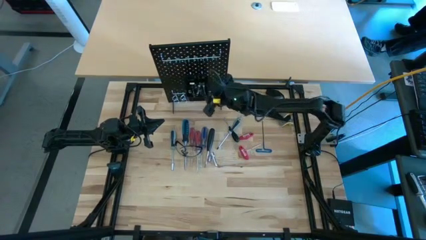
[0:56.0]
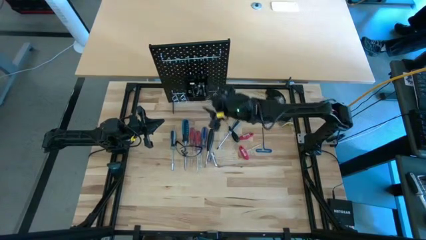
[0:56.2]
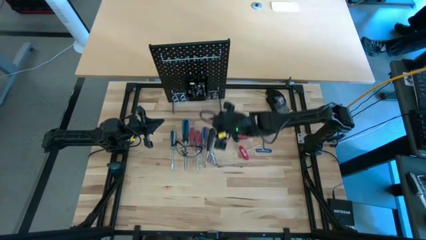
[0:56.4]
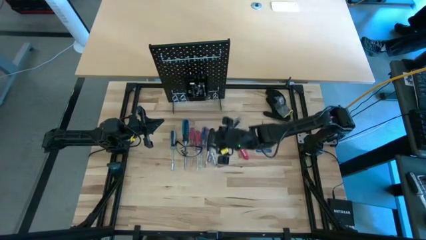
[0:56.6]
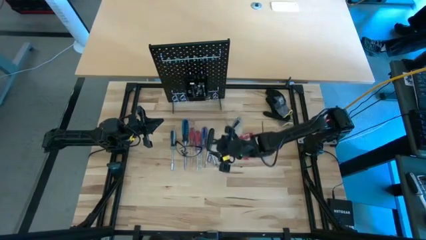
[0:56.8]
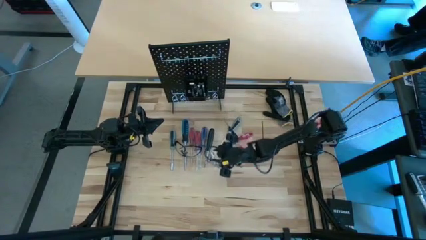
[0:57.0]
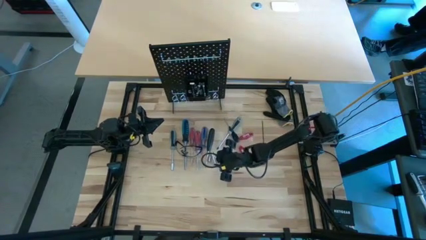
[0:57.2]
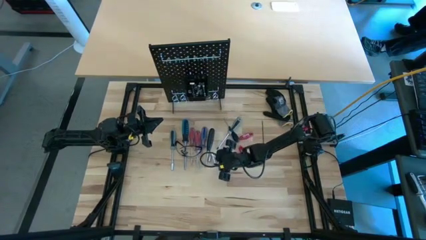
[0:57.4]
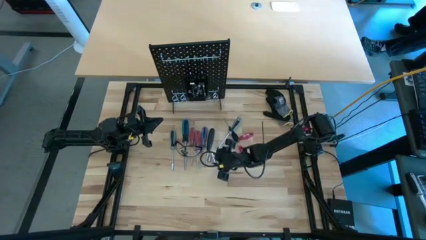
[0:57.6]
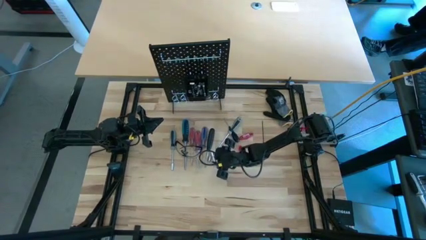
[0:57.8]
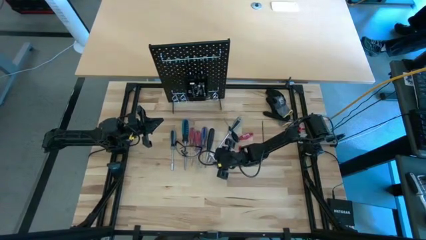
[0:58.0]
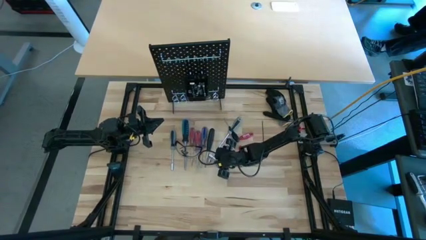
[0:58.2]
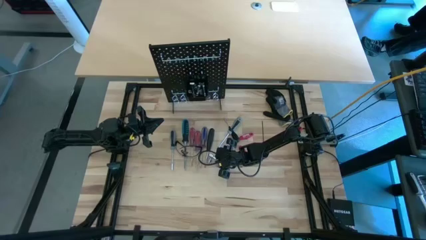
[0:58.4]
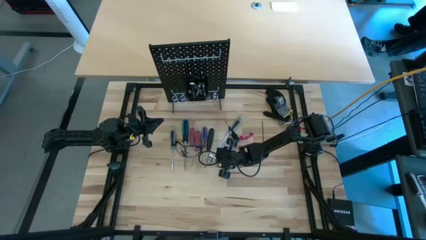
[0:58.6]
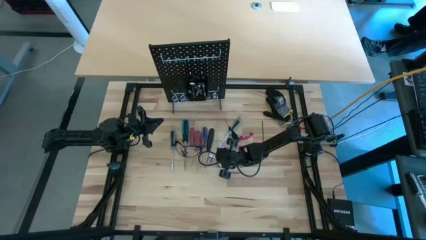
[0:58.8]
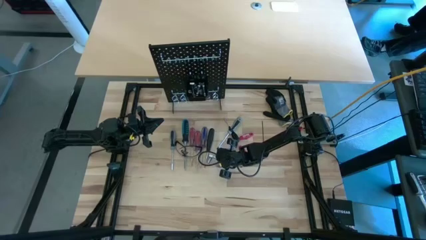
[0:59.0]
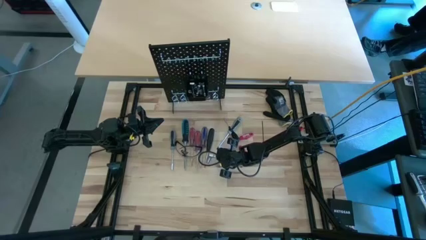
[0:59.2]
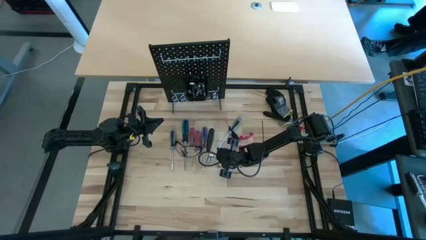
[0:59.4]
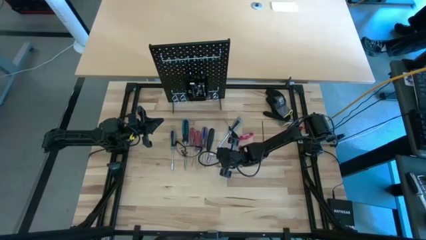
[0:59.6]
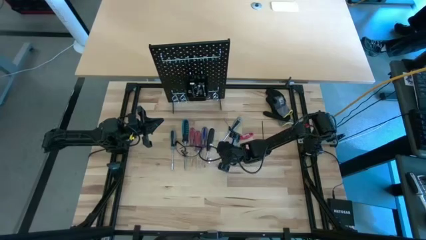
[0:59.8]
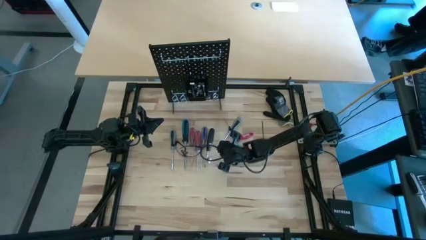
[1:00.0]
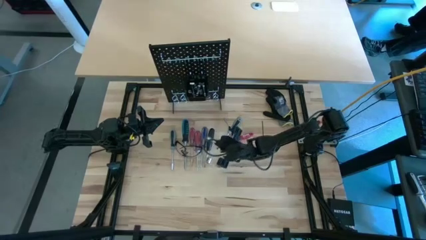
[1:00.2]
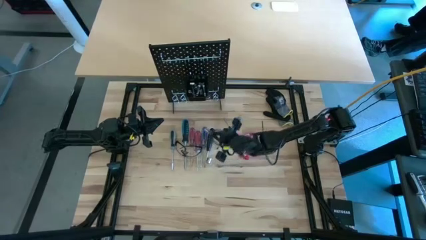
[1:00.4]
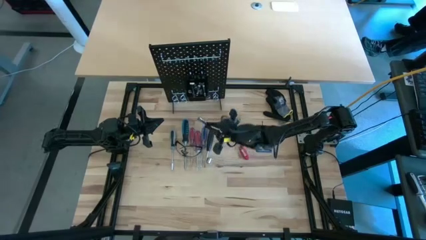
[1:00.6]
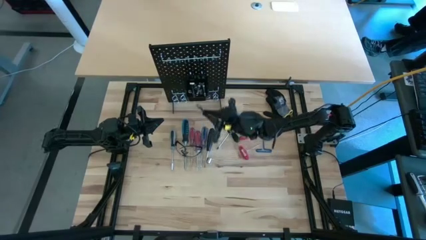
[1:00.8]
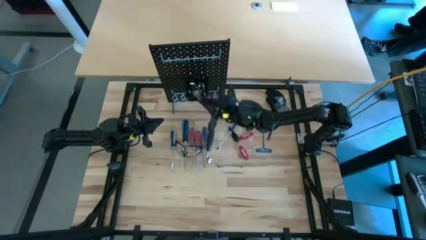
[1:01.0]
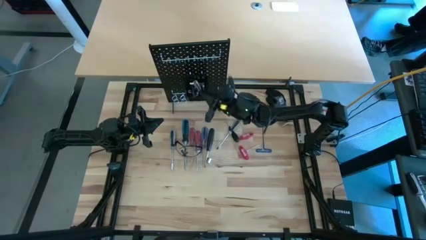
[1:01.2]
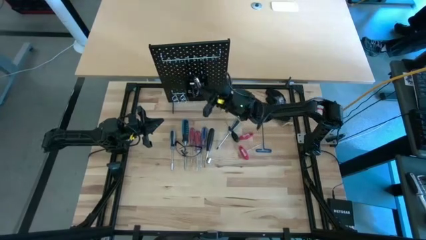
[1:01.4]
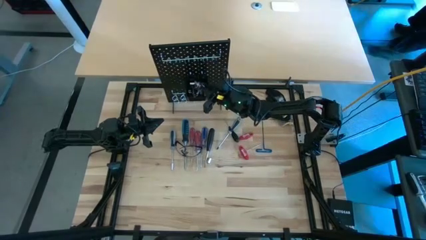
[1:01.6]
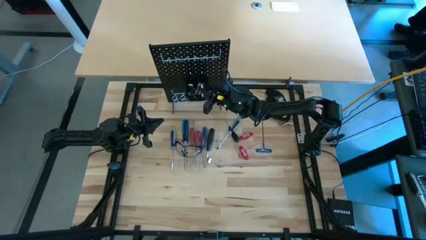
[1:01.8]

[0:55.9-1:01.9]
Task: Hang tools onto peg board
Put the metal extension bar into the black bin on the peg board

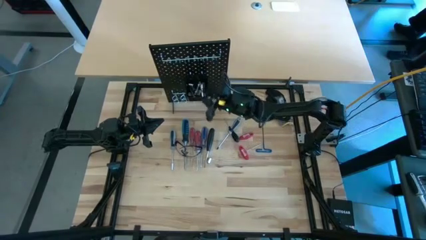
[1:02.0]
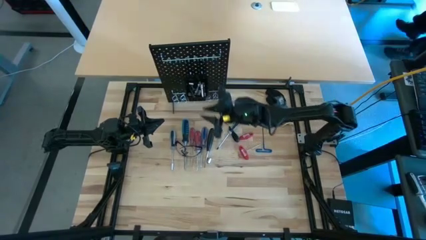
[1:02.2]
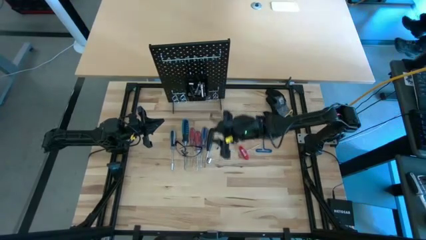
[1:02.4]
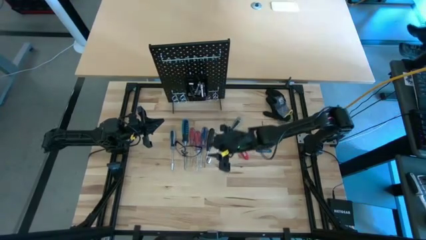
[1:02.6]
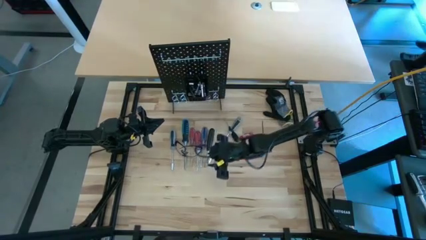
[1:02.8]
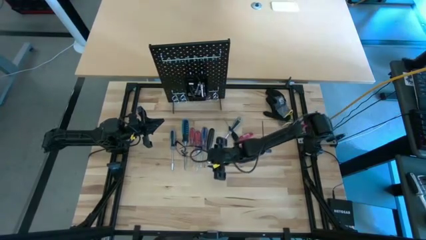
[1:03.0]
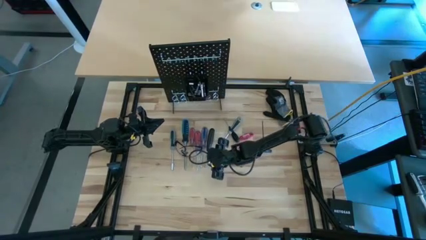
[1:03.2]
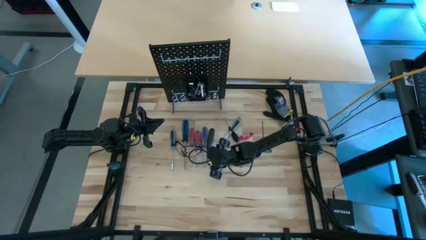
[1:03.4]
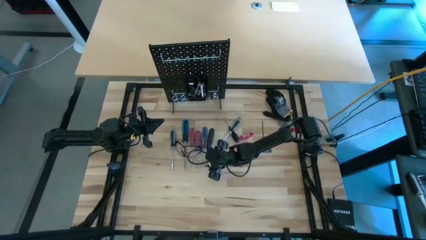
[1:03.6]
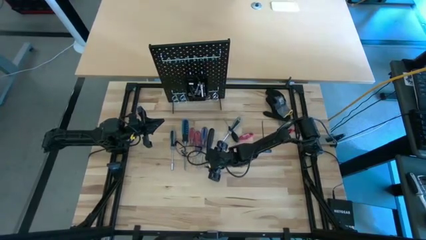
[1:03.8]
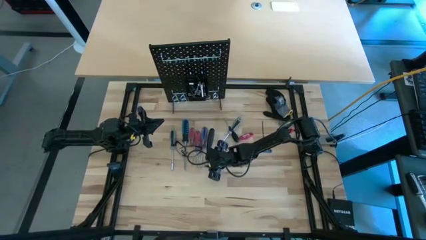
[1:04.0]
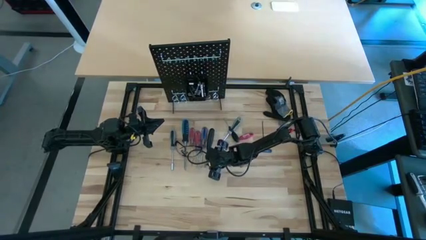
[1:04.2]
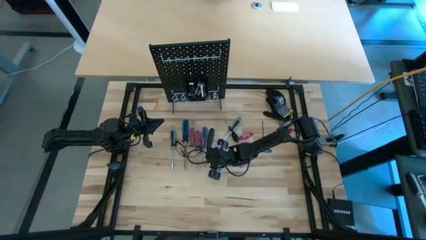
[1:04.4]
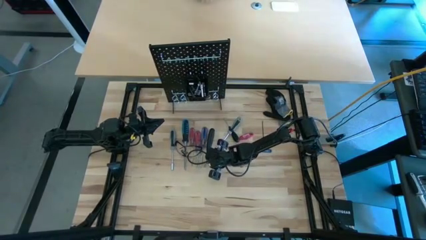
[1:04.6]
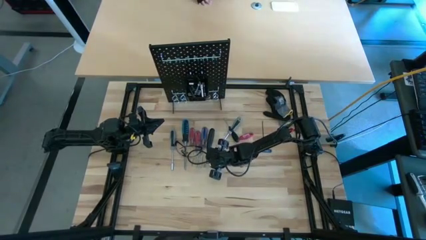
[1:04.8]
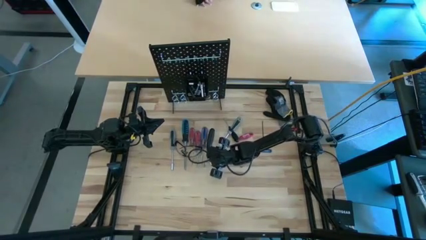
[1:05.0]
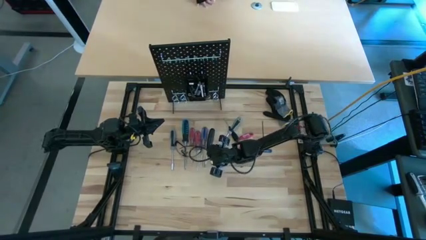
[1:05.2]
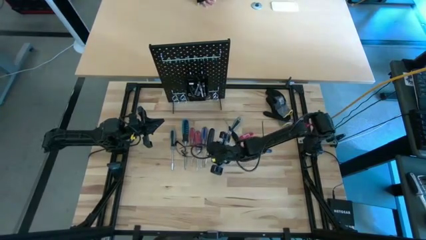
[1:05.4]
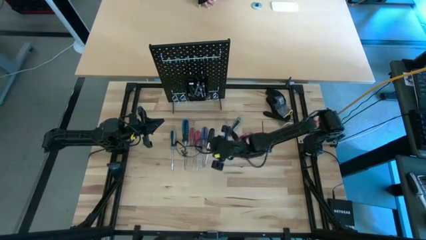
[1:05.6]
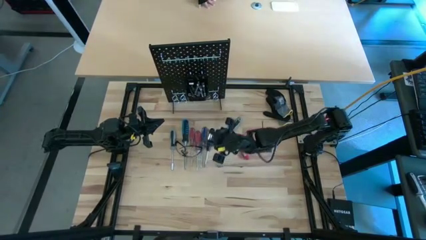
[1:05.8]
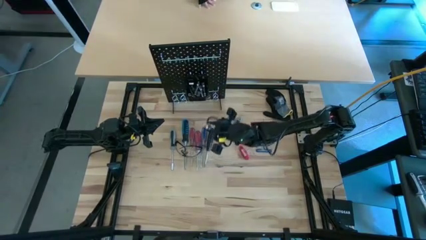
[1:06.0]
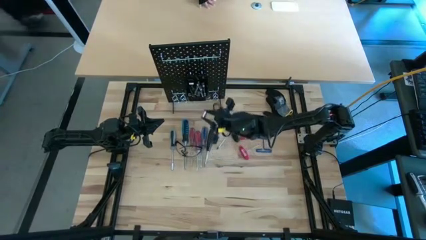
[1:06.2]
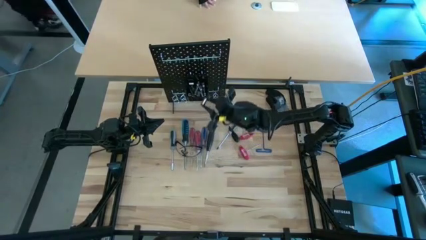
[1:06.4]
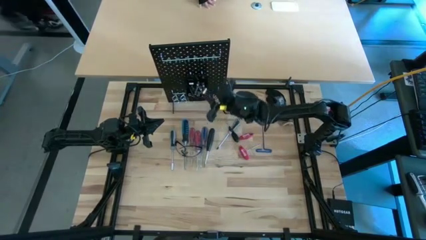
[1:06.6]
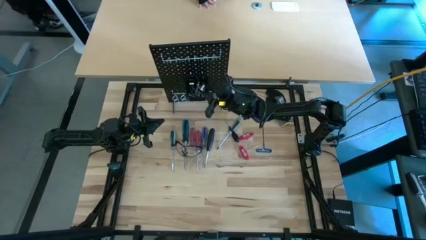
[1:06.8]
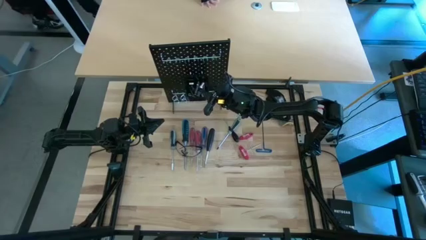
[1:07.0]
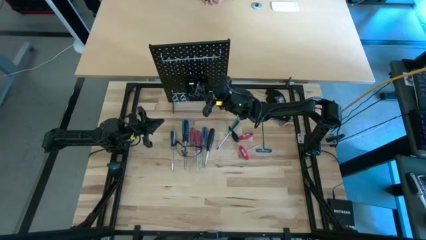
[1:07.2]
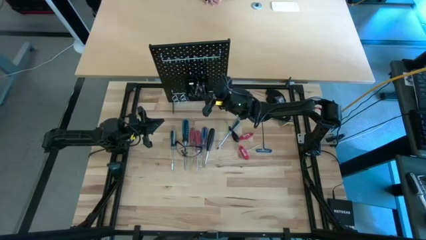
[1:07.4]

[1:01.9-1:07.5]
Put the metal socket into the black bin on the peg board

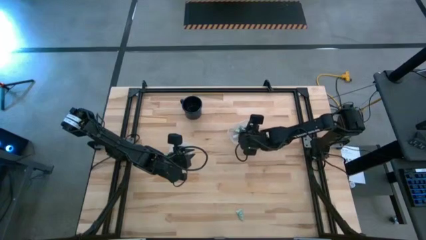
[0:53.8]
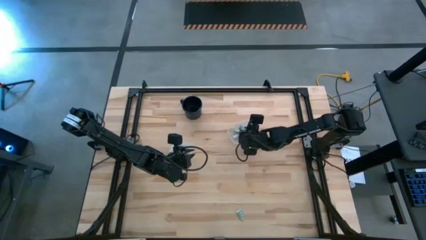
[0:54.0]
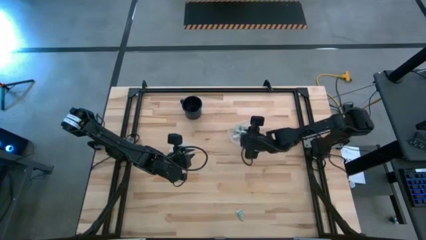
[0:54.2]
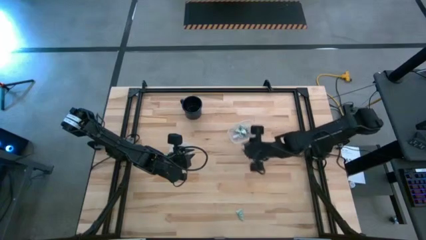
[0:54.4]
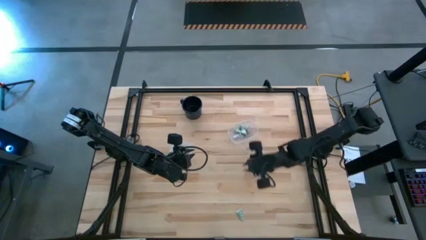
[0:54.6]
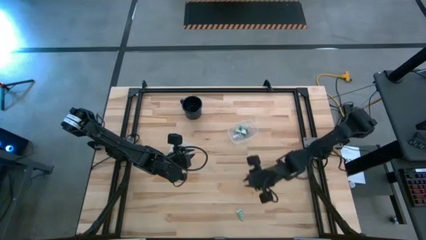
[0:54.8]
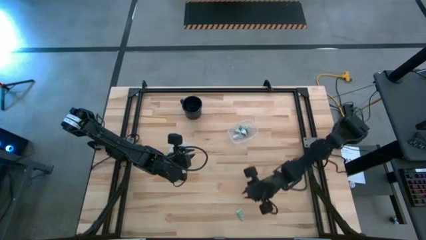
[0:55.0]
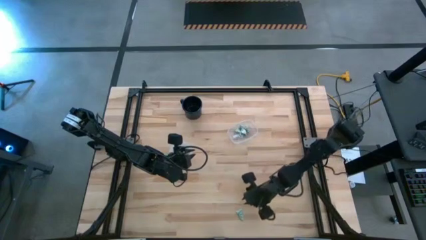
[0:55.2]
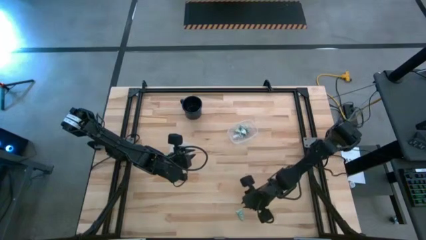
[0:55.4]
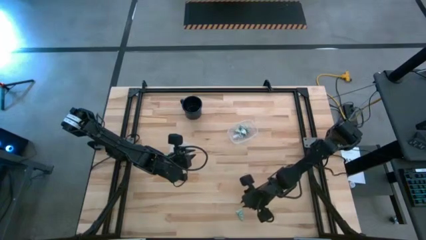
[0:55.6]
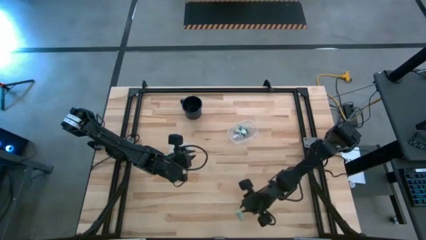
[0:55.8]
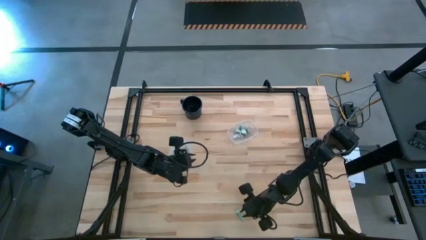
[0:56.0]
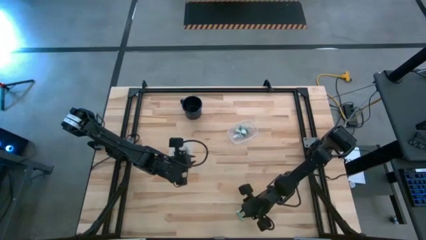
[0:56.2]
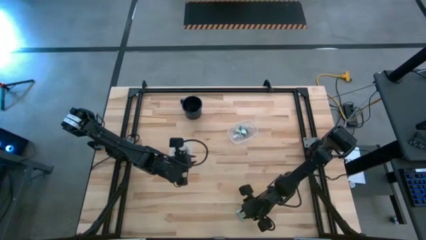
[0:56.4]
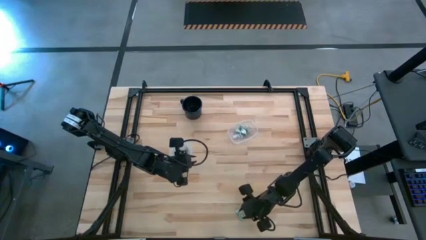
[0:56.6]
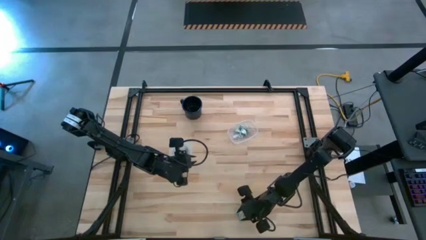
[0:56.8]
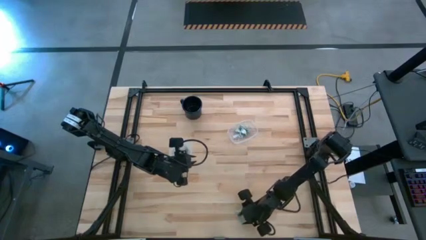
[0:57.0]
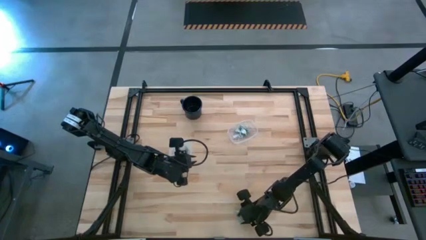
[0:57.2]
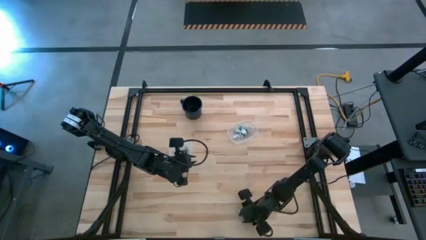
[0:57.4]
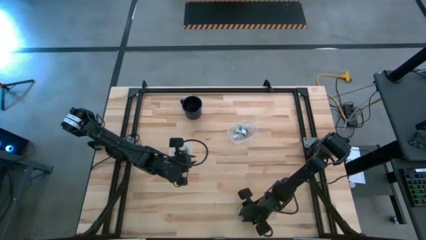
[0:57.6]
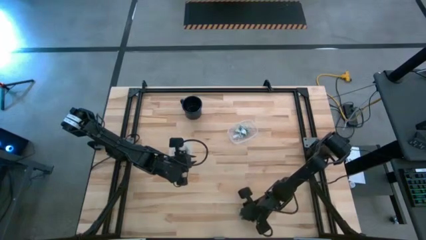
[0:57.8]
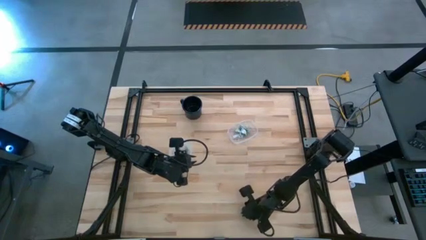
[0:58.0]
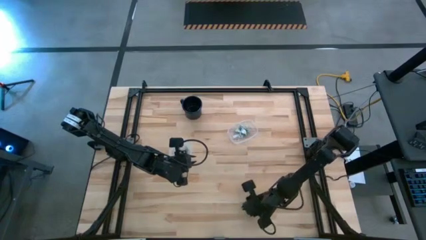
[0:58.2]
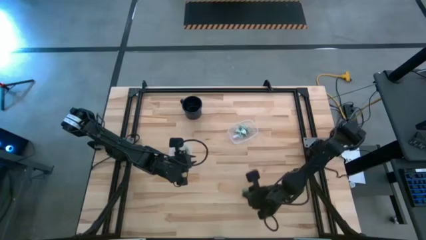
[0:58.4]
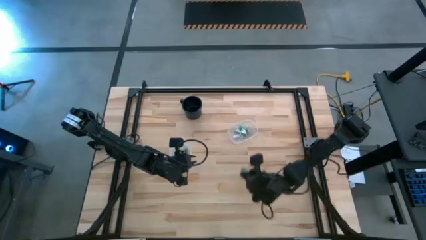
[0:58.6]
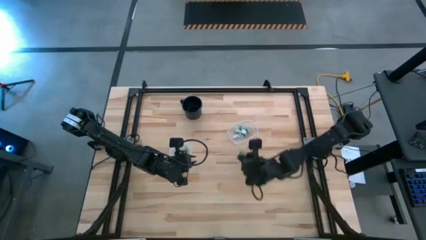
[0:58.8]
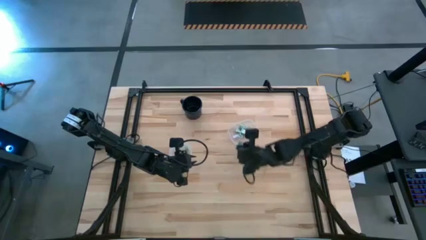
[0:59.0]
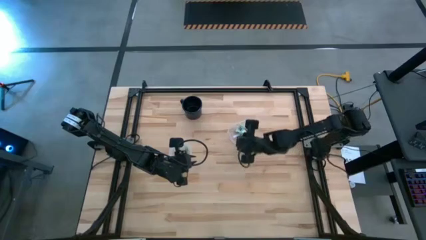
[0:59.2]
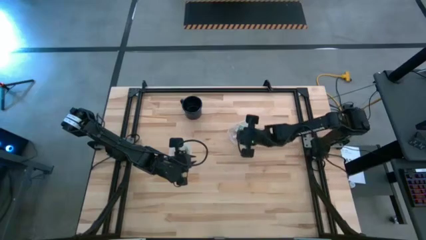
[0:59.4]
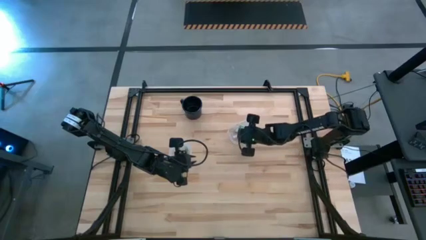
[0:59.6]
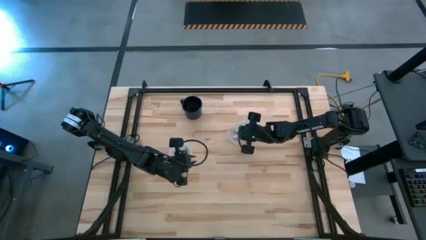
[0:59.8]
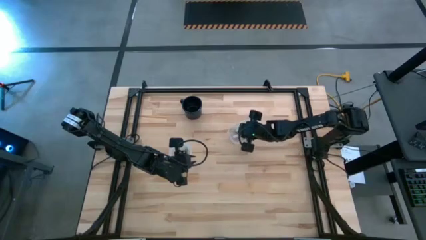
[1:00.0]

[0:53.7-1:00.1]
Task: Pick and place items into bin
Put the stevia packet into the rectangle transparent bin
